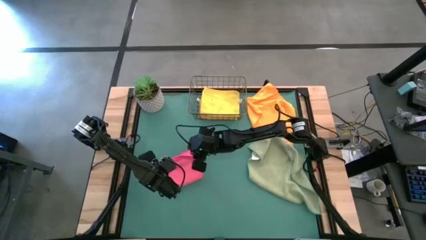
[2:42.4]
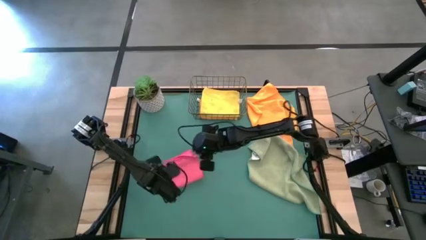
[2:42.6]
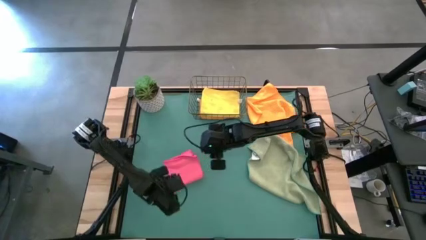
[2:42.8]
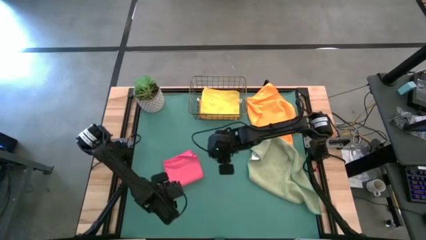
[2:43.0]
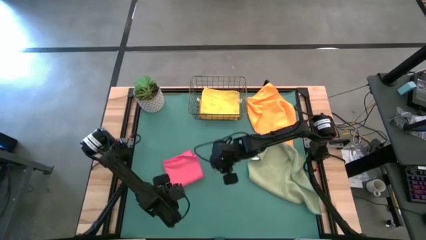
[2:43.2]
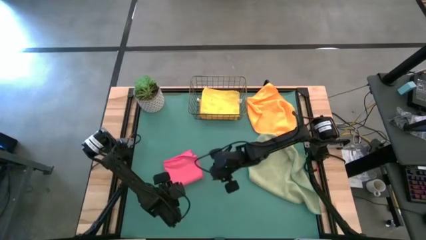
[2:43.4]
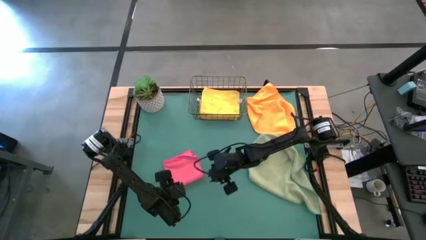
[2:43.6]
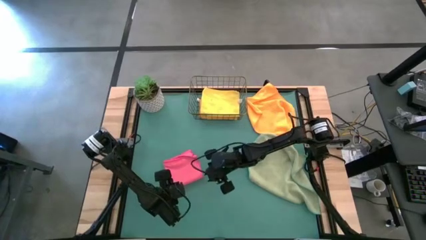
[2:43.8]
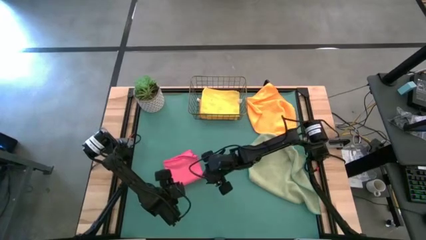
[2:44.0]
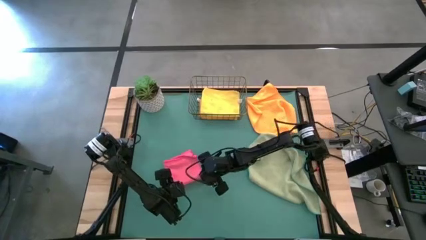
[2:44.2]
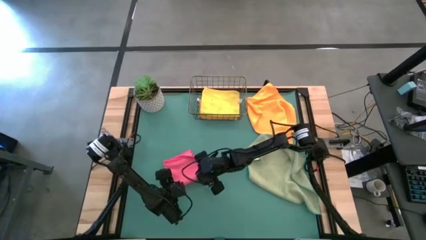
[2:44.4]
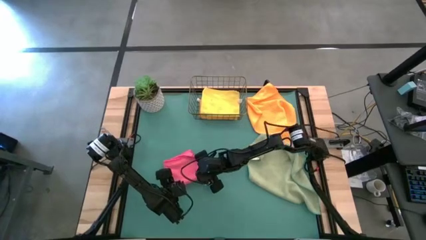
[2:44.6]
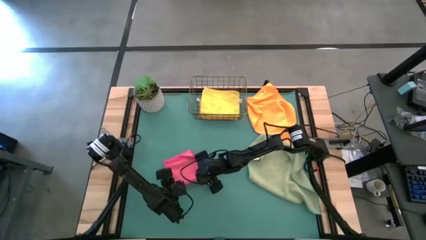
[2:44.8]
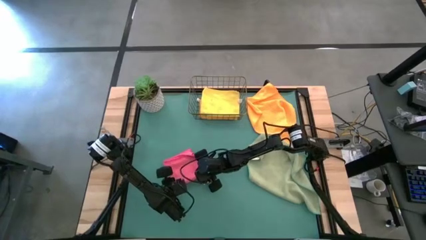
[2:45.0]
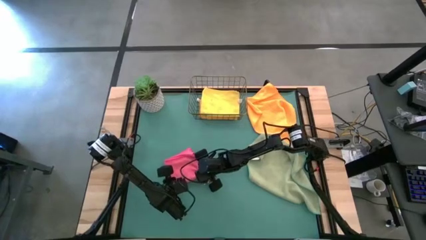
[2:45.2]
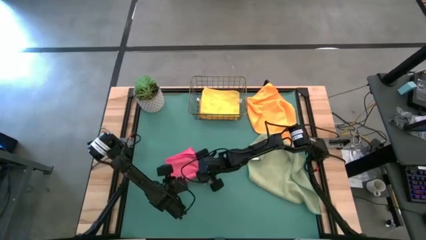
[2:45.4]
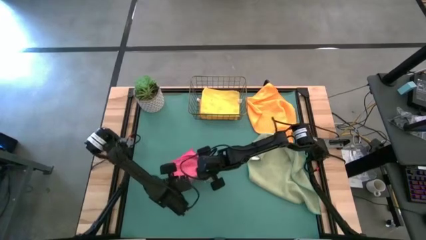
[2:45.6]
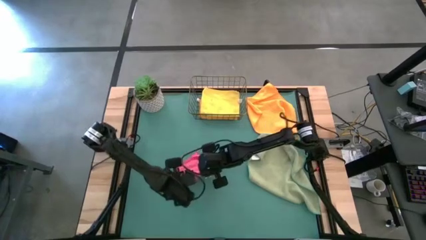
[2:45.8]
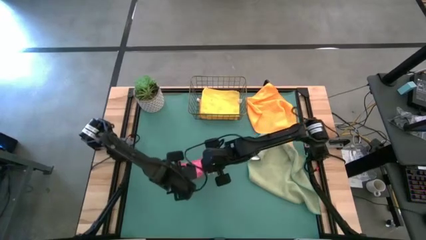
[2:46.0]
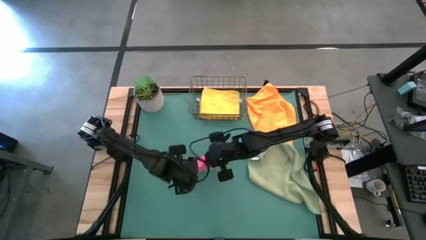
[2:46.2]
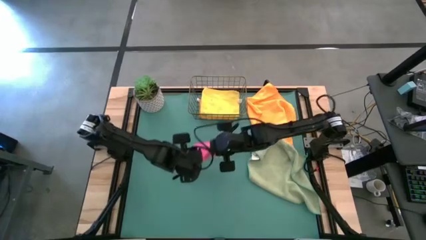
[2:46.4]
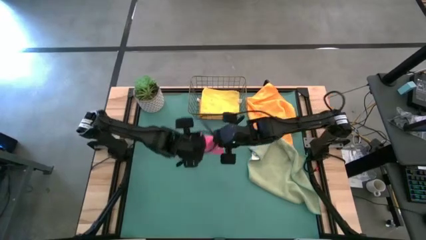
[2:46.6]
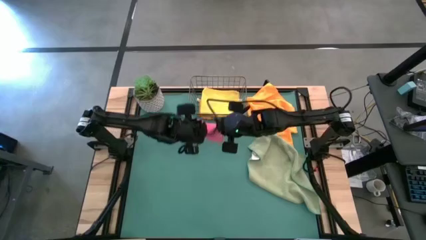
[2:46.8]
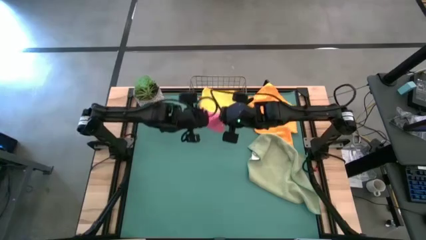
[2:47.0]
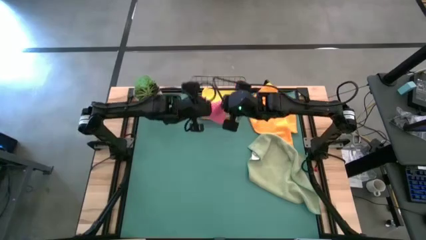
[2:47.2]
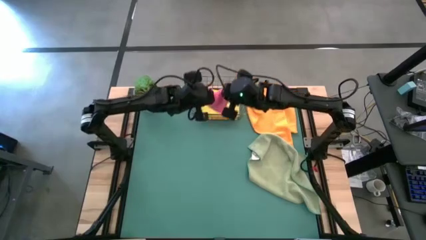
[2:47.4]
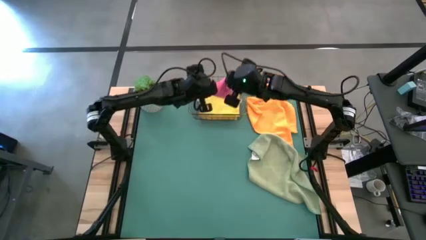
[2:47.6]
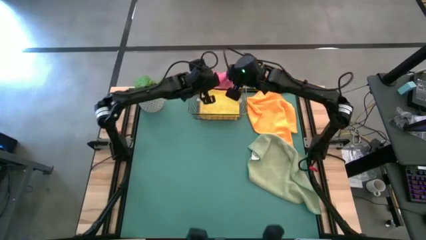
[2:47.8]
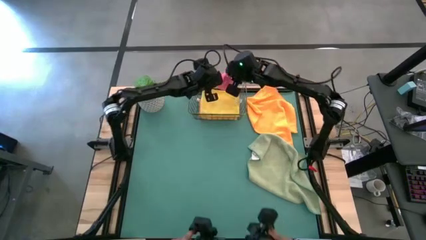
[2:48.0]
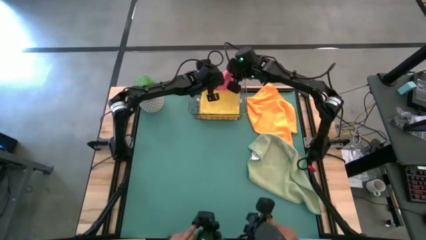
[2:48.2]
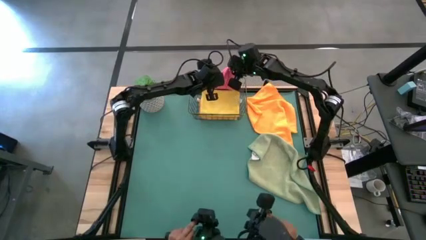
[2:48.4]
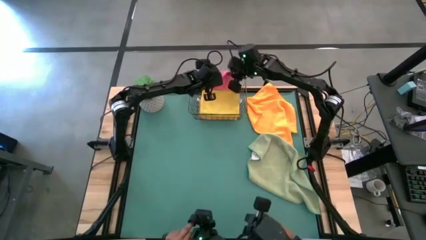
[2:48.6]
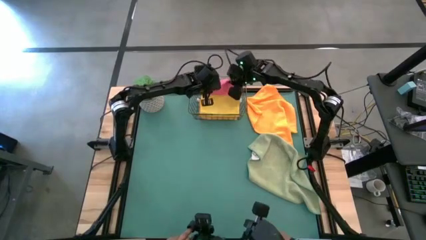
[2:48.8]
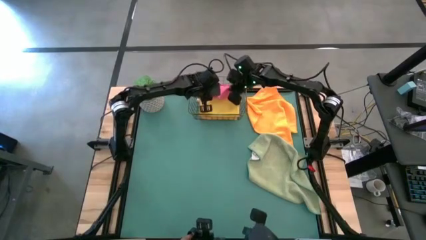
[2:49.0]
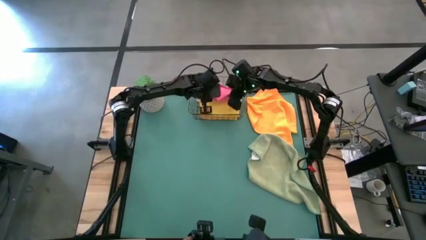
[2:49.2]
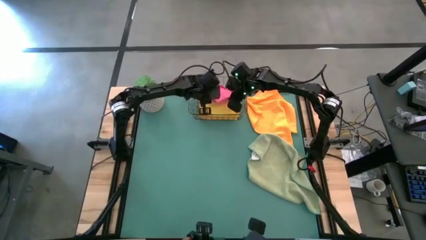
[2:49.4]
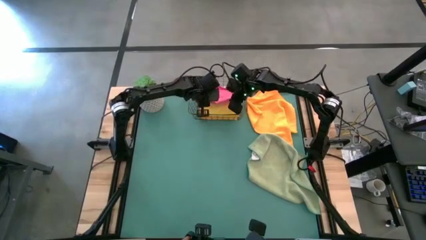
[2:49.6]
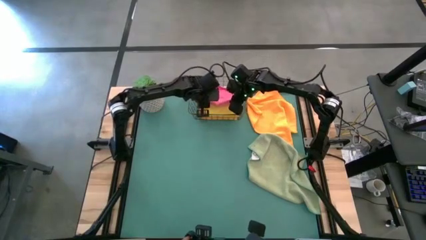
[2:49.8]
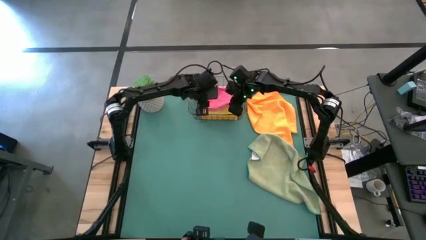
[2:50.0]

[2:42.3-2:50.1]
Task: Fold microfiber towels
Put the pink microfiber cloth into the wire basket

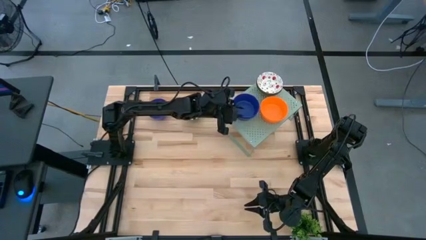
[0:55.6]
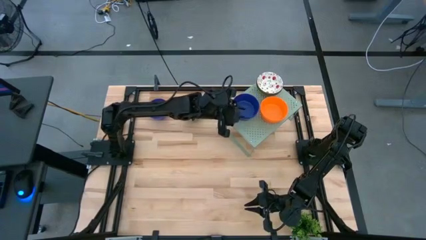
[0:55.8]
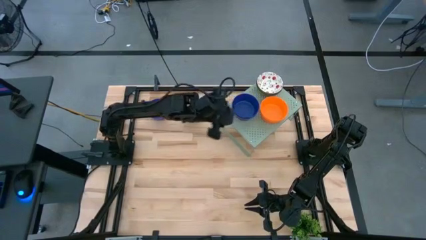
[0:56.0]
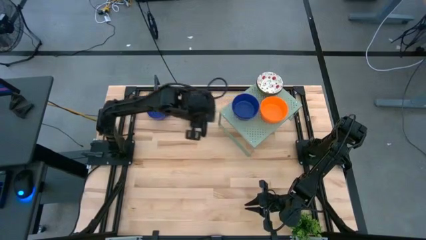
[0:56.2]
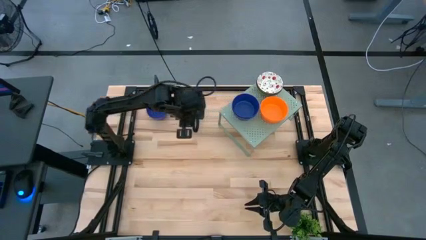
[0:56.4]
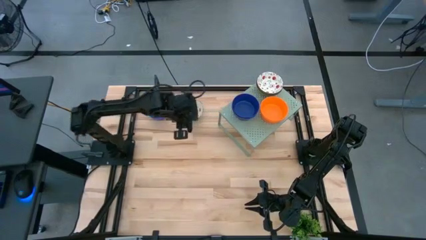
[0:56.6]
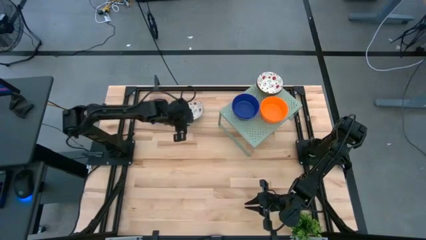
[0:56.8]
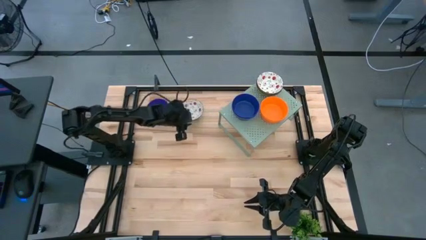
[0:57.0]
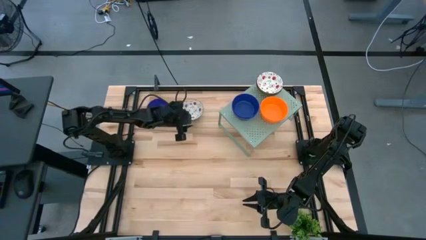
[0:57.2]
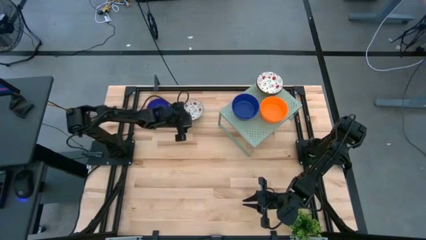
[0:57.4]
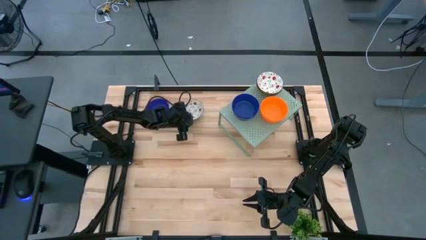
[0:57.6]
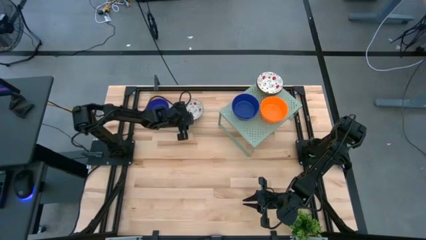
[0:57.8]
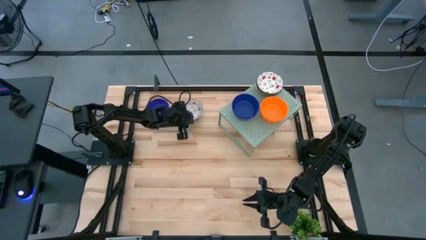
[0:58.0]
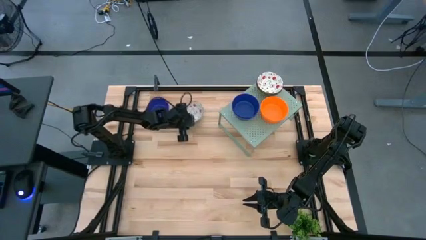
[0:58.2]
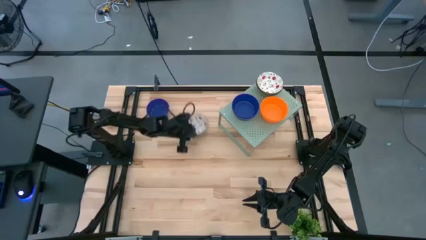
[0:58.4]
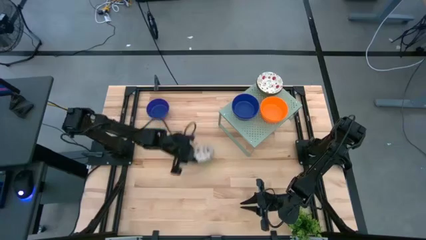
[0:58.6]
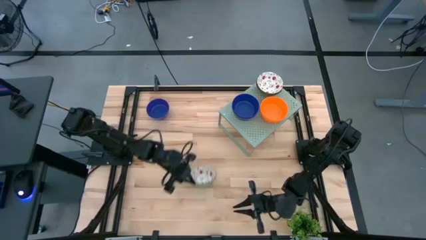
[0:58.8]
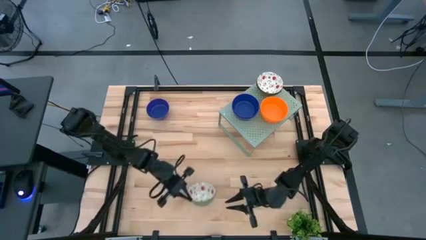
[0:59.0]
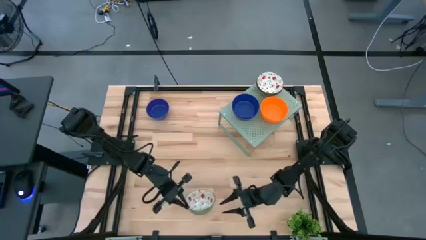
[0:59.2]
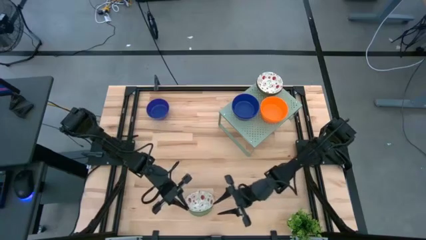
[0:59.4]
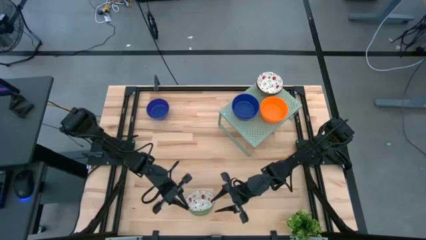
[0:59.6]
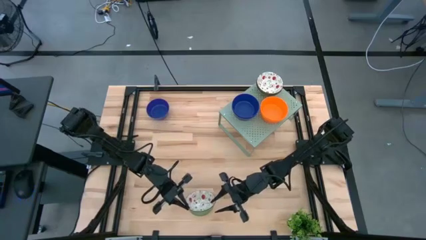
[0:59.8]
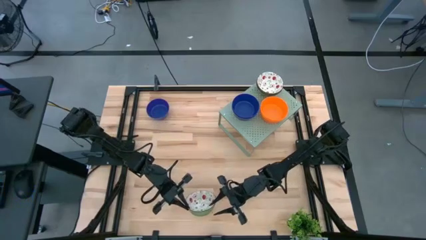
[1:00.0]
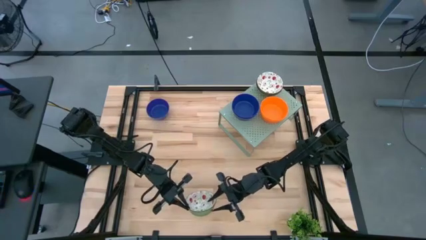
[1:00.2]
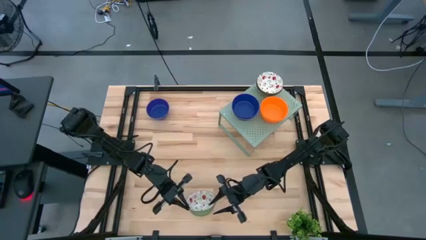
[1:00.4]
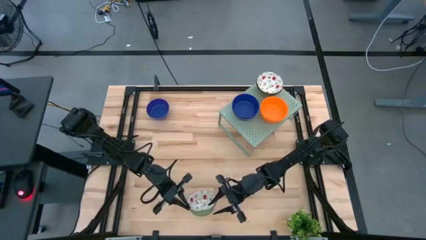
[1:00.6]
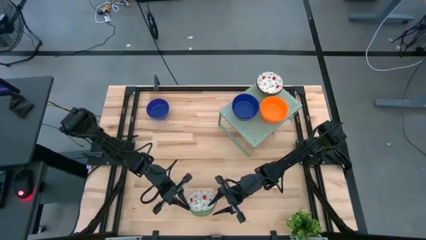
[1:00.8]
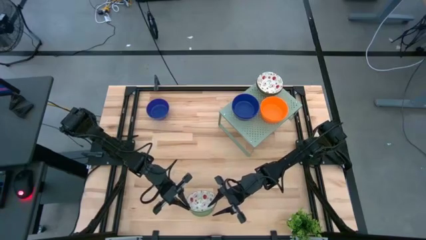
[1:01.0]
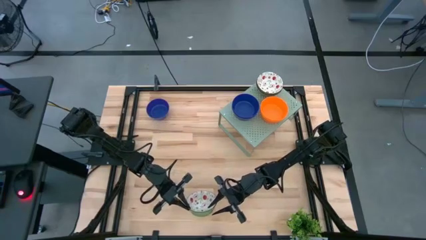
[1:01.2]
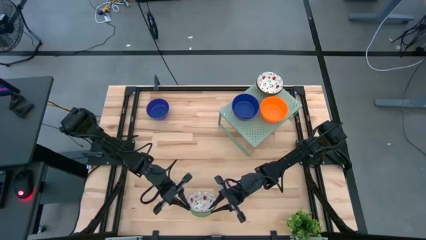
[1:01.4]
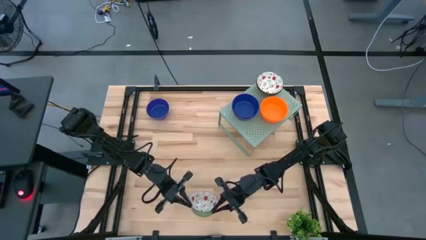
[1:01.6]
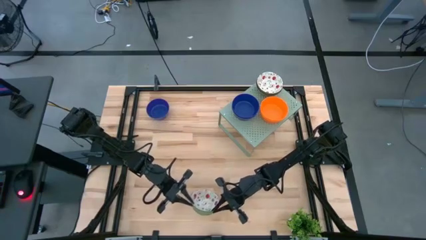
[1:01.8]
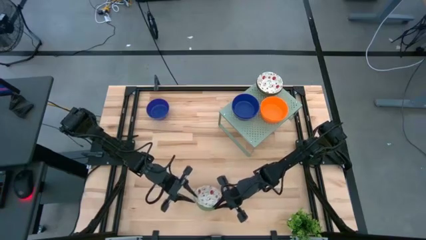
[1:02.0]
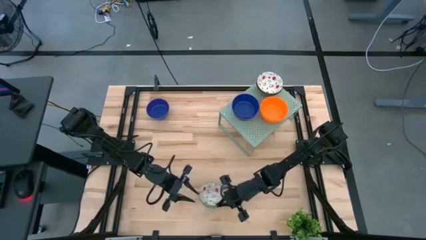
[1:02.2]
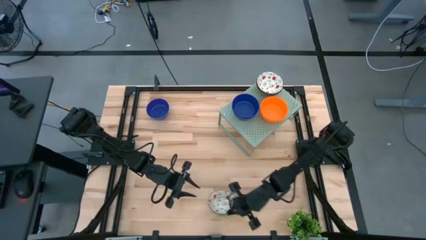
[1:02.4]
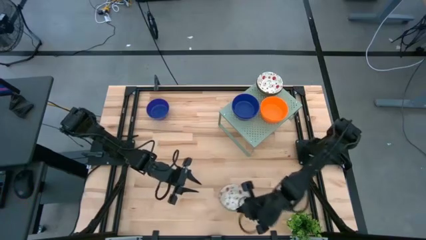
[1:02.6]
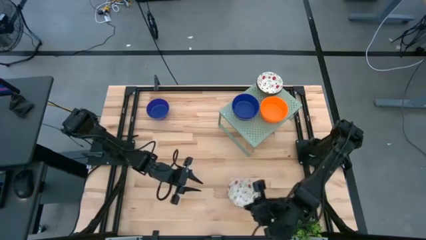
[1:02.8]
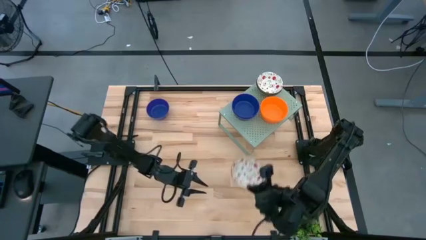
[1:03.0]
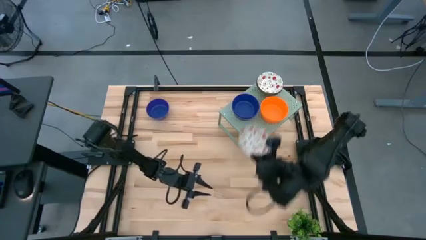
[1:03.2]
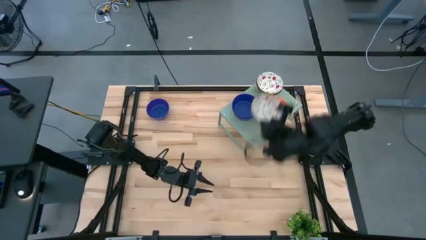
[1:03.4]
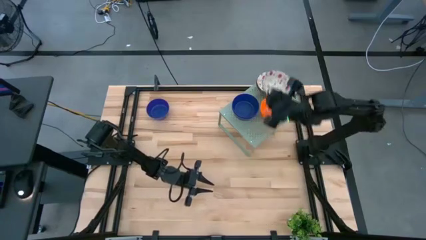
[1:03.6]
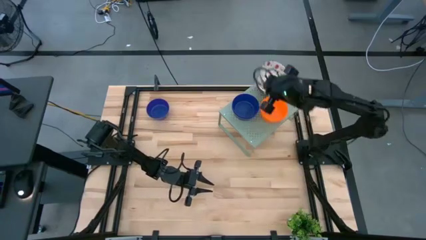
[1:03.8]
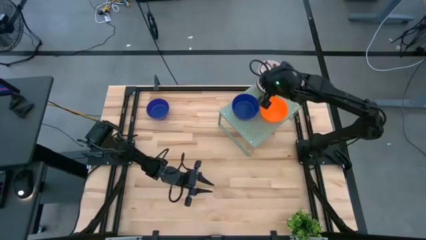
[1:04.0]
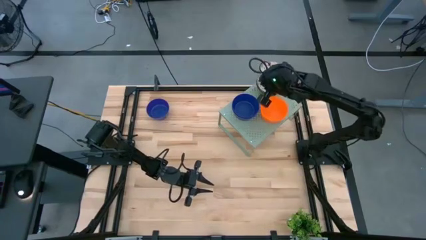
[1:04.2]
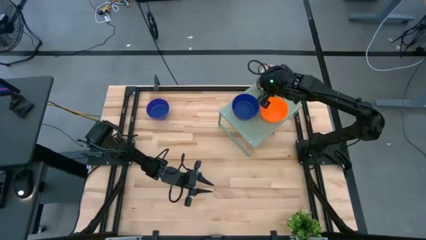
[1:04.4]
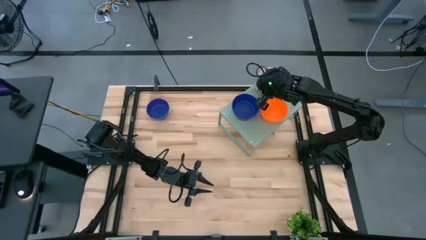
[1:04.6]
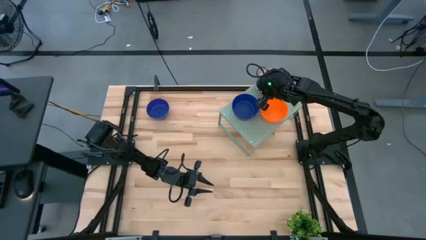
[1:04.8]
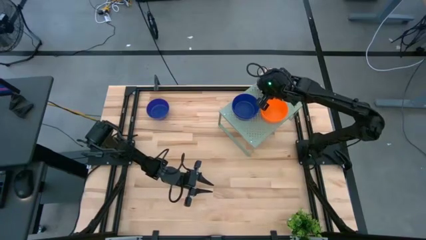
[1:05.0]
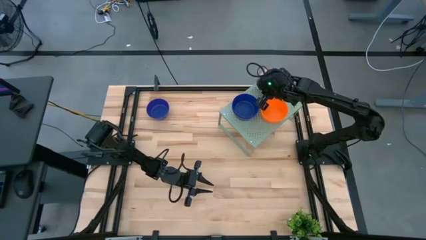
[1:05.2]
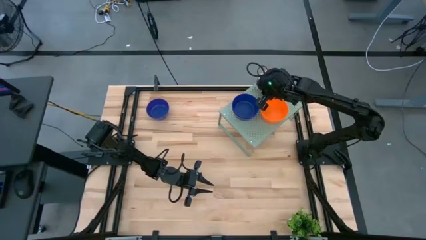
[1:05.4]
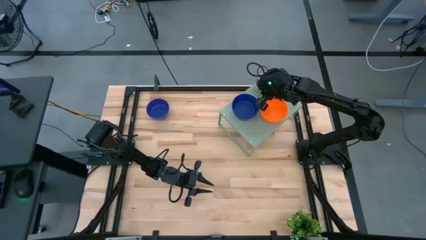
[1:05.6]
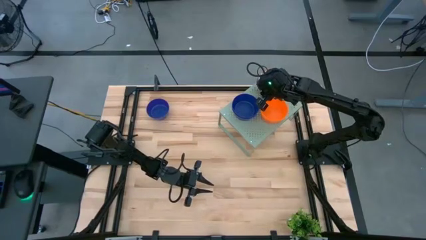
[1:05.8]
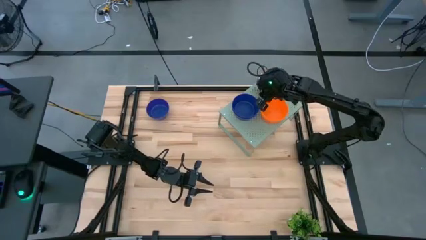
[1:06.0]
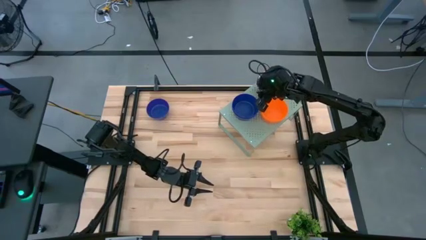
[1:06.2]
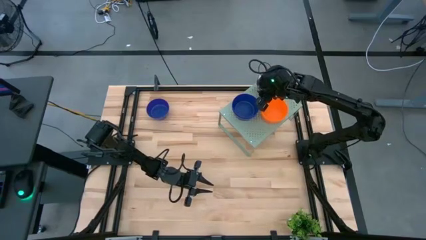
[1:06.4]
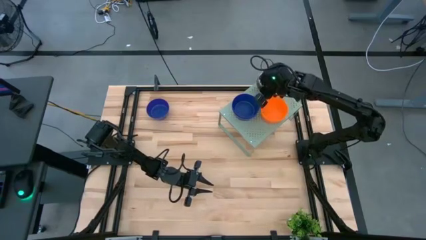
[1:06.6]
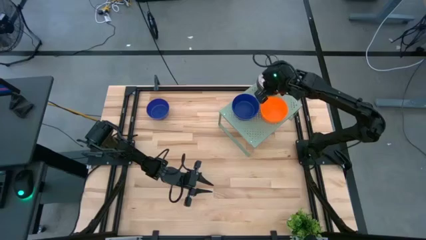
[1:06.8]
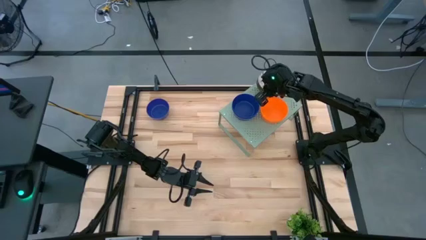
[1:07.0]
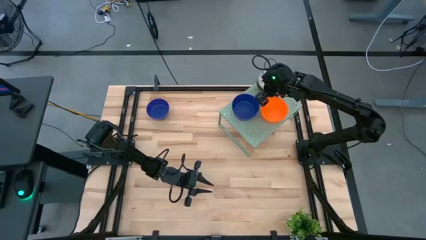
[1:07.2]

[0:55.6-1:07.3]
Task: Pick & Place Mini bowls
Stack the white patterned bowl on the white patterned bowl on the shelf
